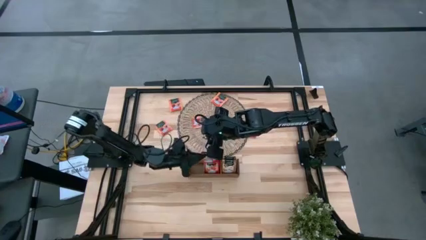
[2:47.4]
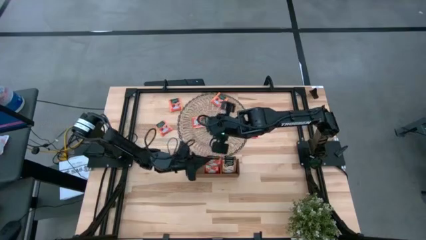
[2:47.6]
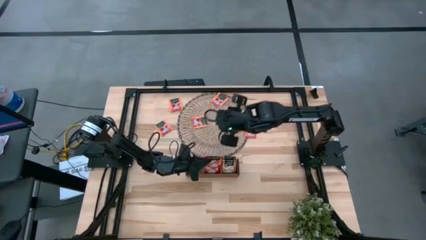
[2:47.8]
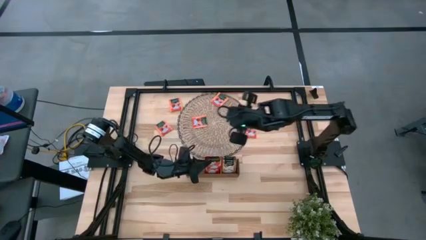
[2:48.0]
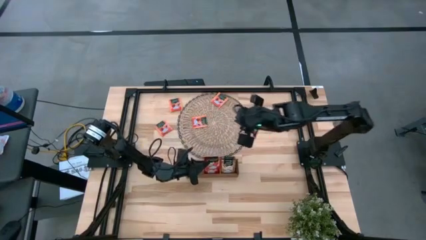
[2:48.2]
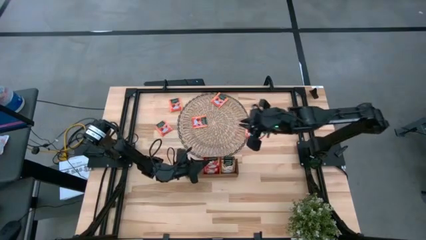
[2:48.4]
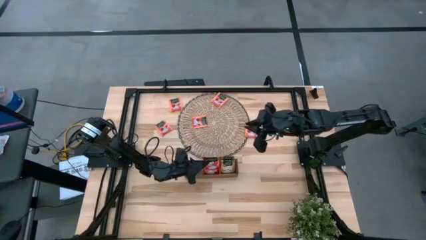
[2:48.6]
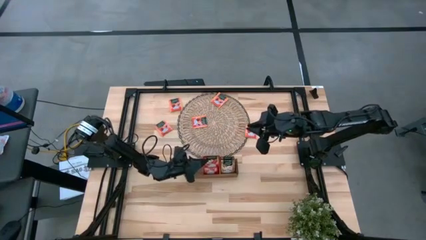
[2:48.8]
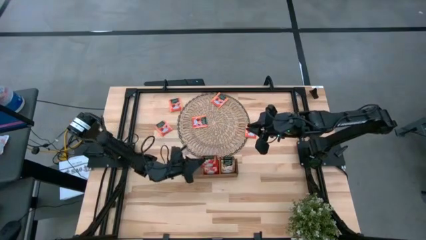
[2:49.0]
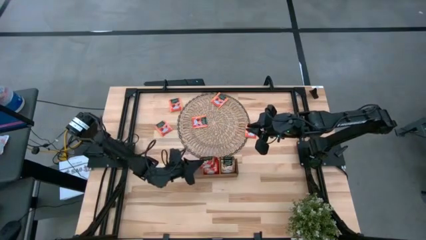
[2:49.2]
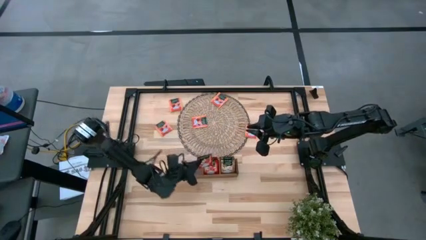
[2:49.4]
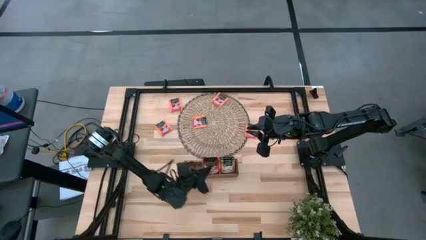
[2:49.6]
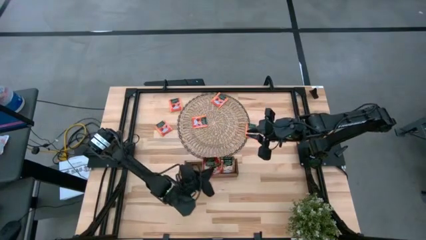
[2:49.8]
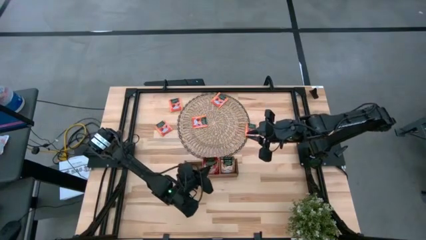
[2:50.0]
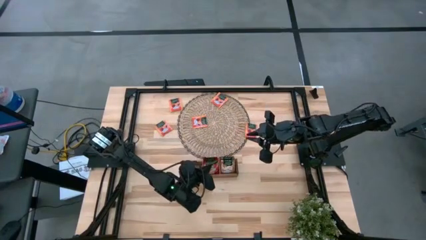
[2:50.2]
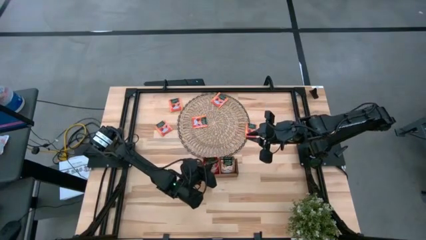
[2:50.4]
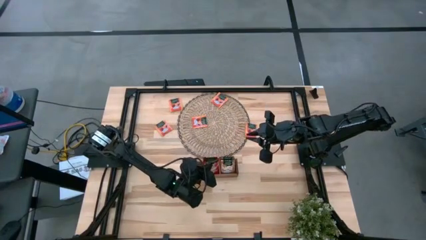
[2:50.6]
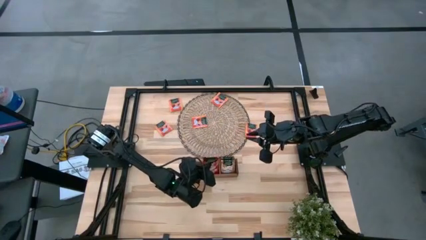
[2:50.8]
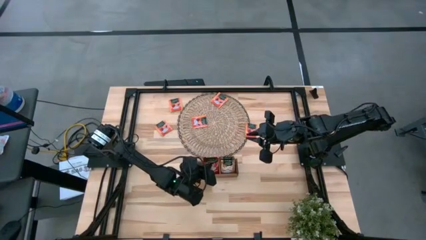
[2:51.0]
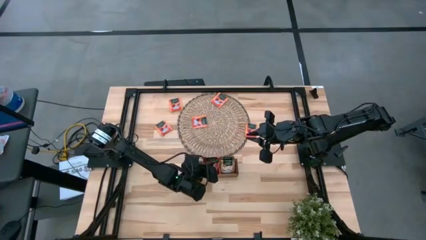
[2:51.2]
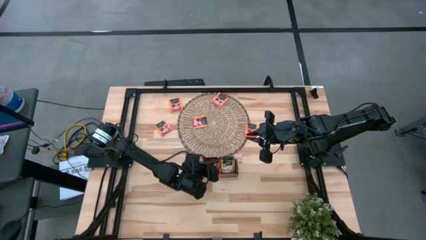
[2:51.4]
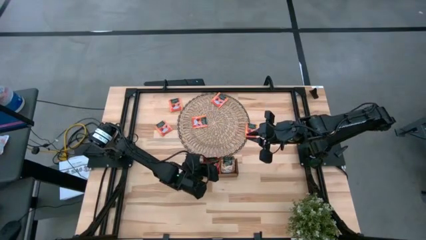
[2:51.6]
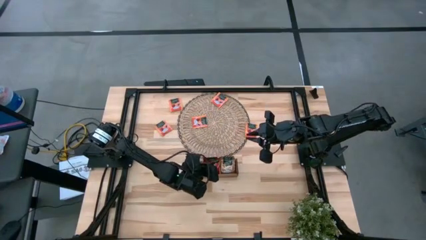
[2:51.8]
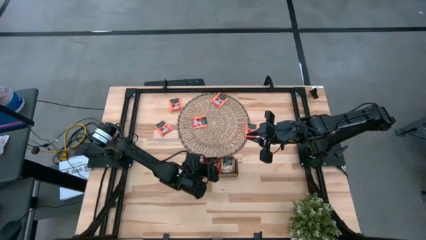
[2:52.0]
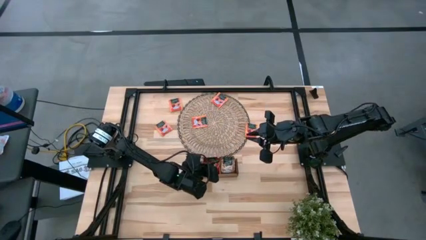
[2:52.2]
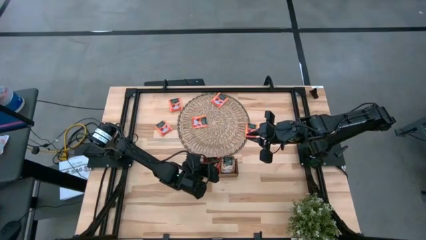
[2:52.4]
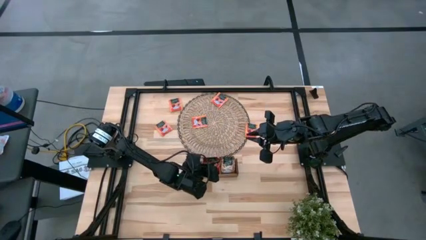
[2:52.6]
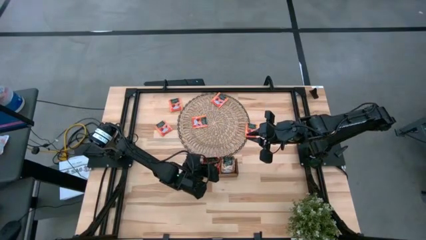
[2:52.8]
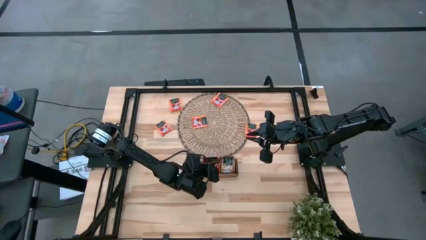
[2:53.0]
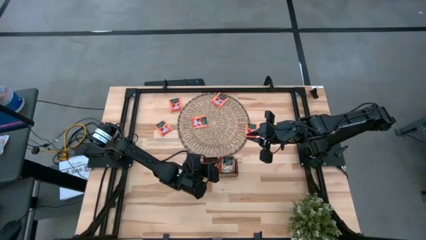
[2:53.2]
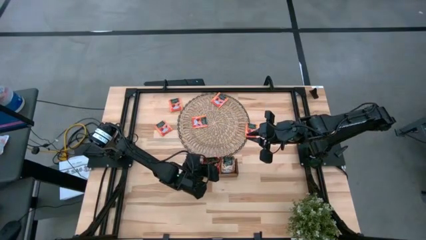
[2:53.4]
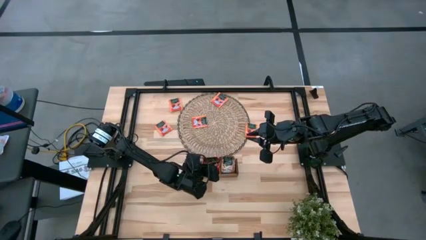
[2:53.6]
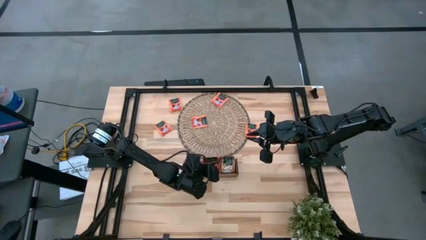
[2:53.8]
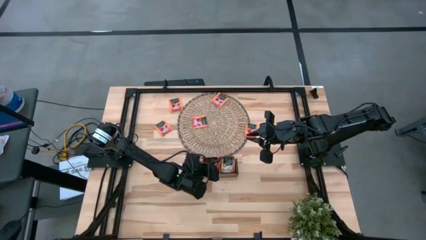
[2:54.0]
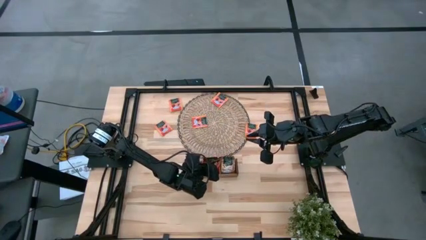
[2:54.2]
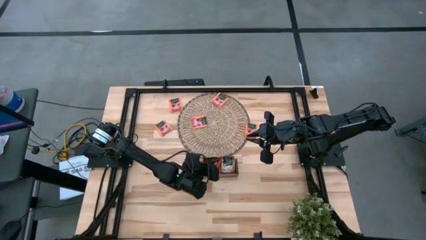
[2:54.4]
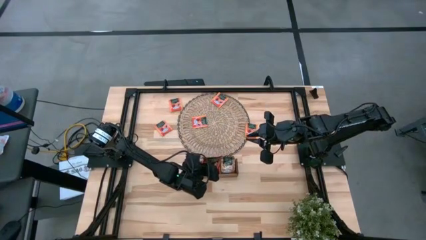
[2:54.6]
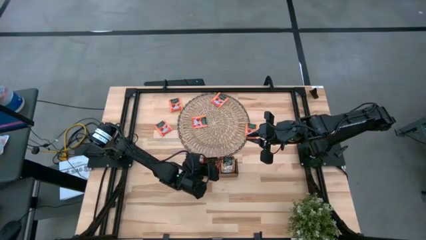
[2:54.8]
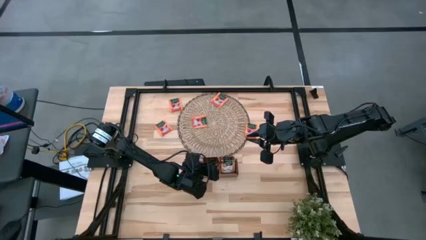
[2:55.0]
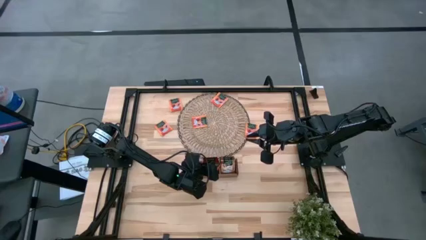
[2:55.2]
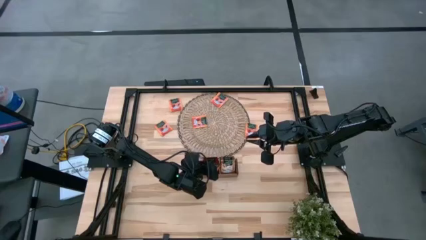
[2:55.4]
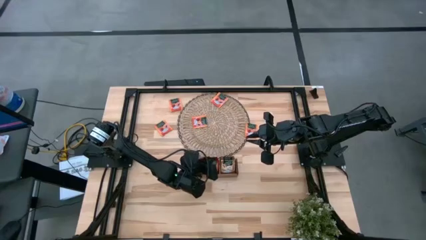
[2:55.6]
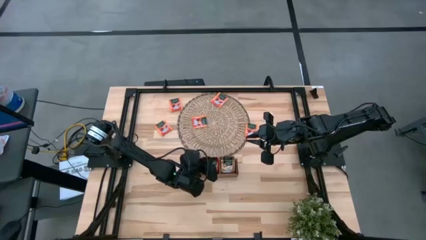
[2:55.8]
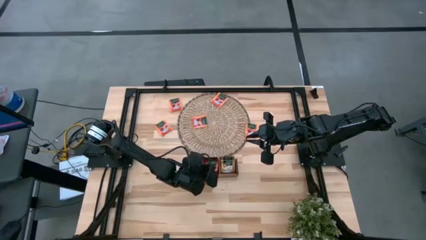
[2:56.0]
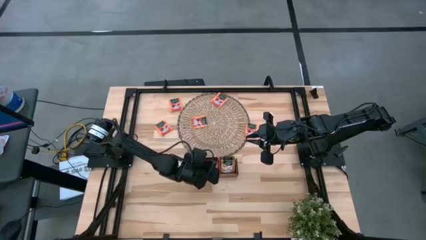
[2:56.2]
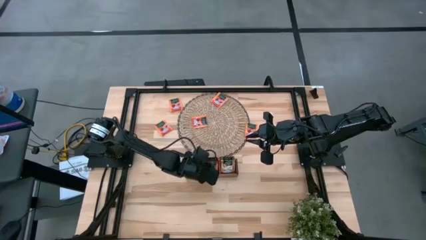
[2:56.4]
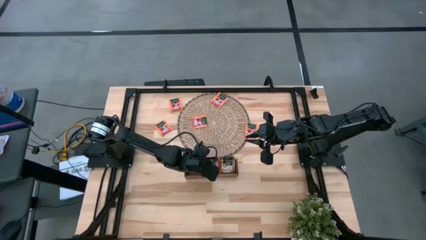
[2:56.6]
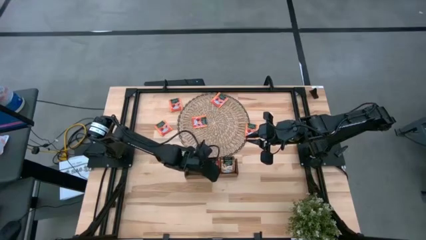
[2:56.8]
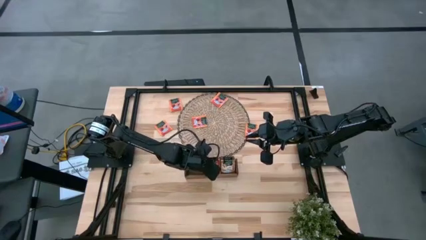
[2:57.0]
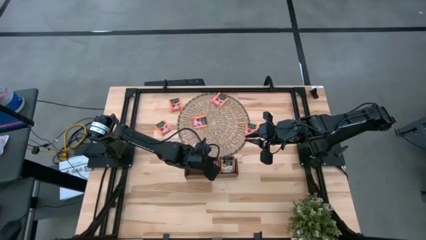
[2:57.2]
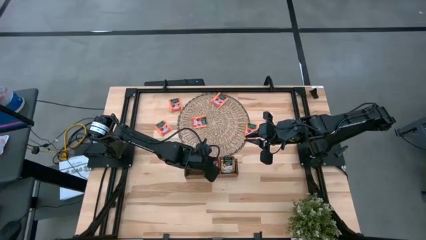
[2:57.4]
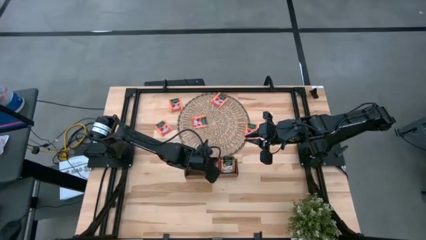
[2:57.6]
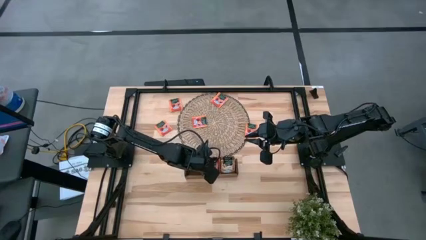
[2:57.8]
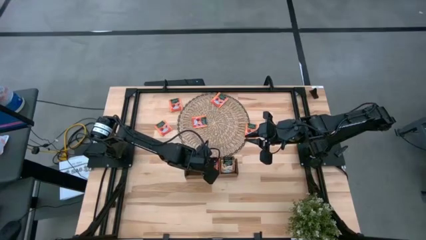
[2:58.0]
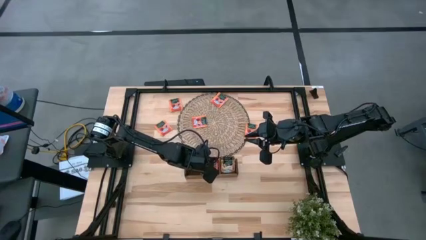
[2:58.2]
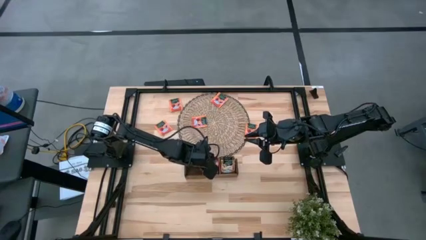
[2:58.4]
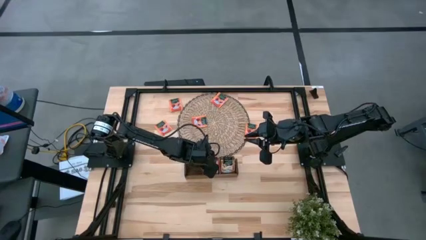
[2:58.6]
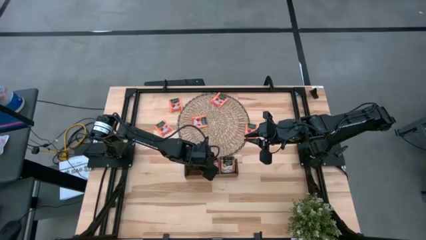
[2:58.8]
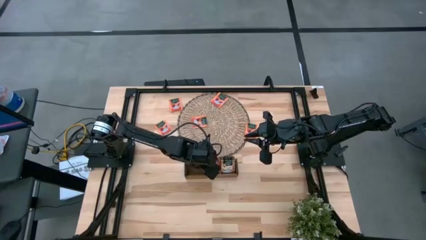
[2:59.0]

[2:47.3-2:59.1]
Task: Pick & Place Tea
Put the red tea bag into the middle section of the wooden organizer
